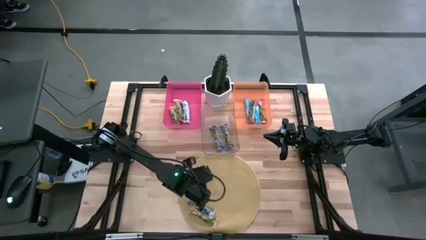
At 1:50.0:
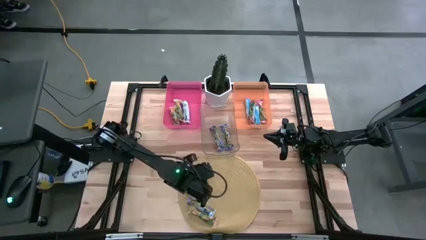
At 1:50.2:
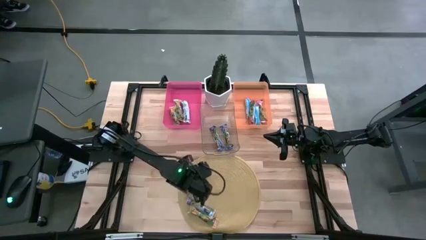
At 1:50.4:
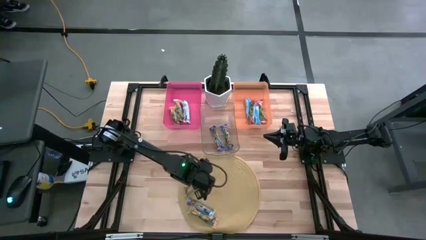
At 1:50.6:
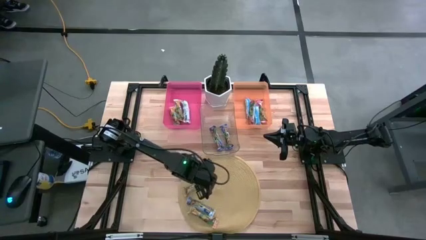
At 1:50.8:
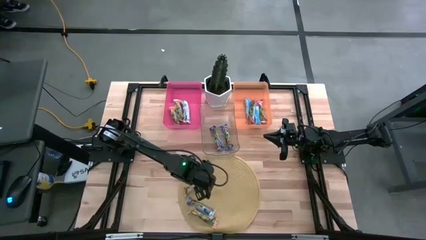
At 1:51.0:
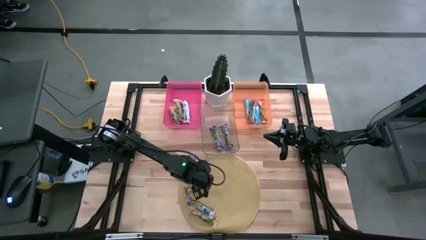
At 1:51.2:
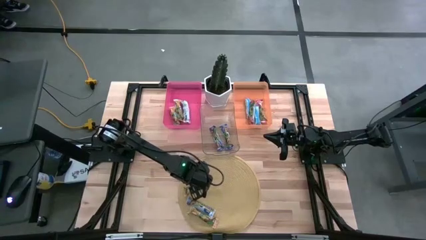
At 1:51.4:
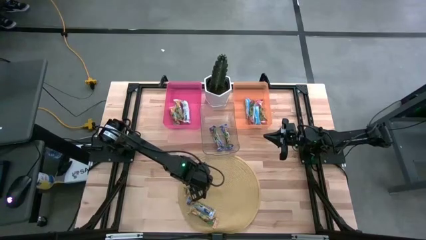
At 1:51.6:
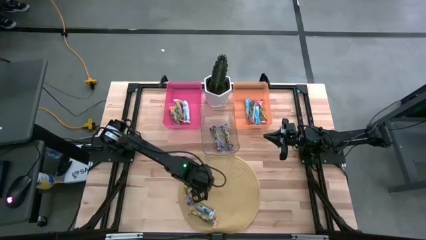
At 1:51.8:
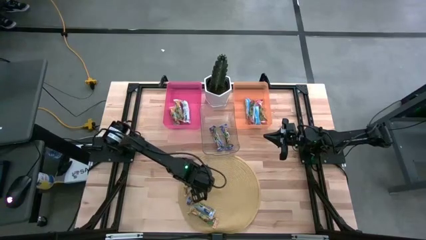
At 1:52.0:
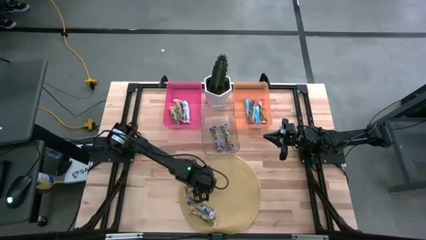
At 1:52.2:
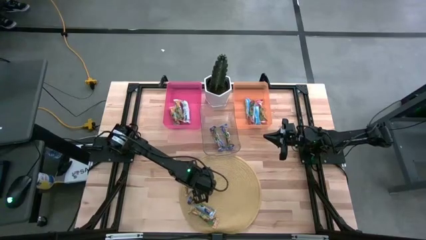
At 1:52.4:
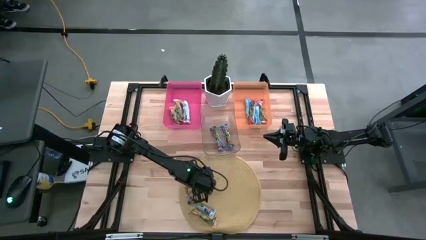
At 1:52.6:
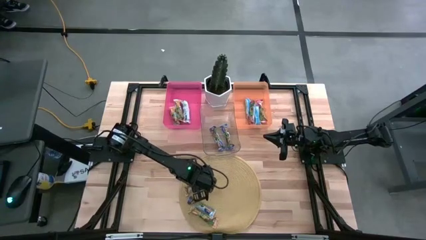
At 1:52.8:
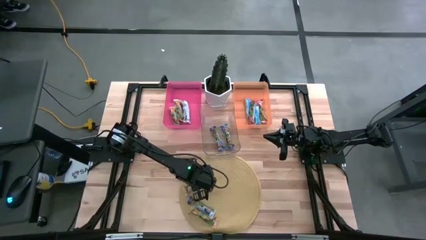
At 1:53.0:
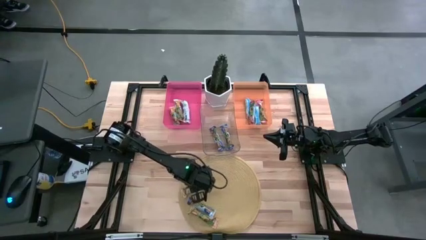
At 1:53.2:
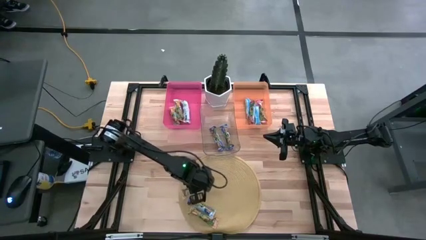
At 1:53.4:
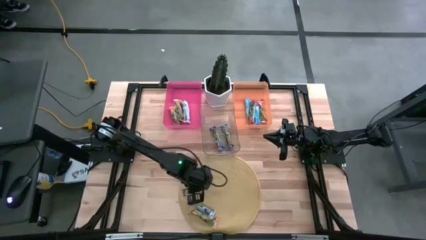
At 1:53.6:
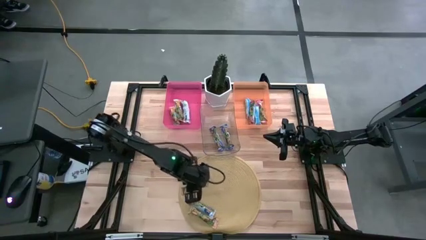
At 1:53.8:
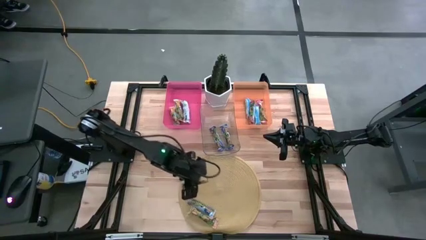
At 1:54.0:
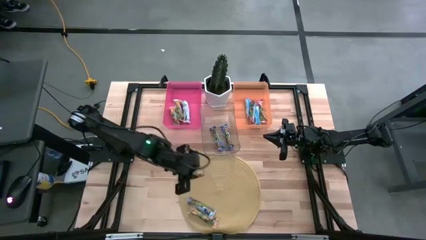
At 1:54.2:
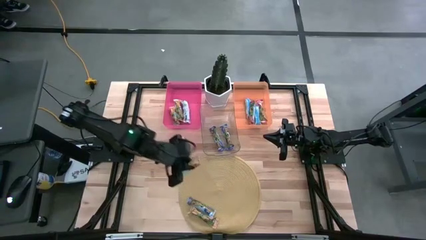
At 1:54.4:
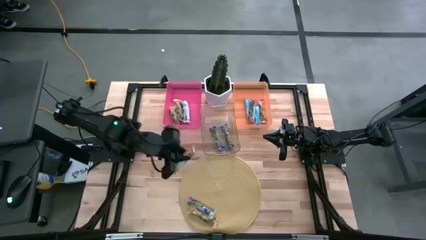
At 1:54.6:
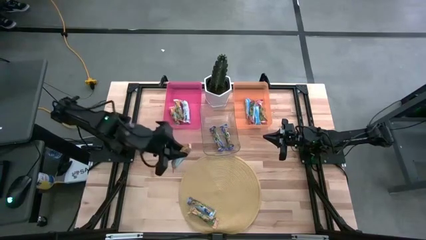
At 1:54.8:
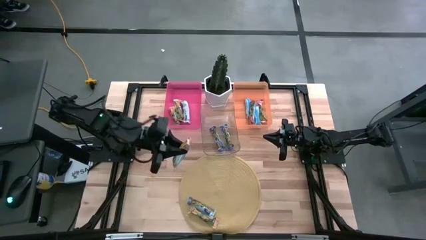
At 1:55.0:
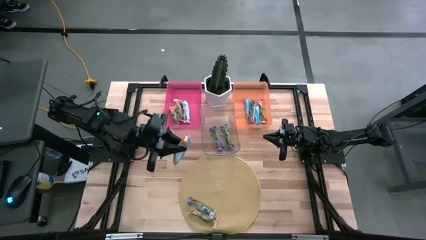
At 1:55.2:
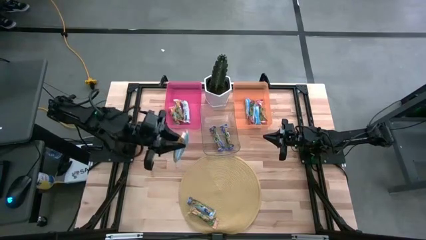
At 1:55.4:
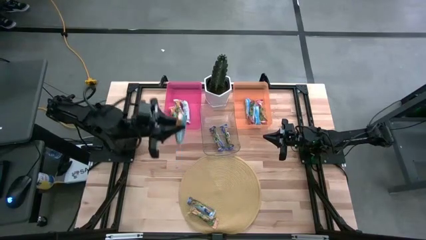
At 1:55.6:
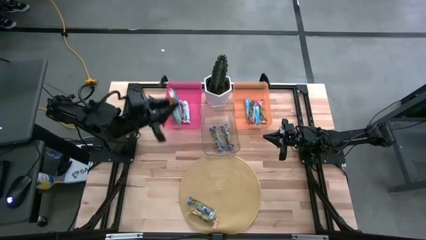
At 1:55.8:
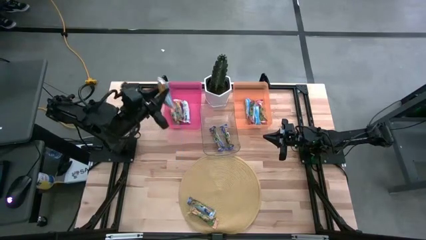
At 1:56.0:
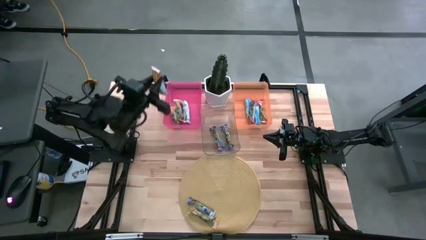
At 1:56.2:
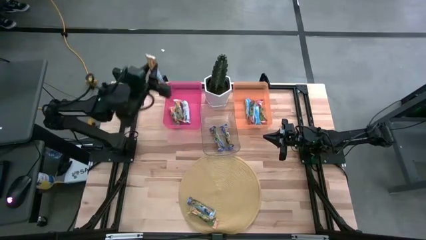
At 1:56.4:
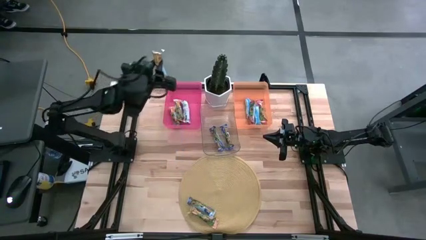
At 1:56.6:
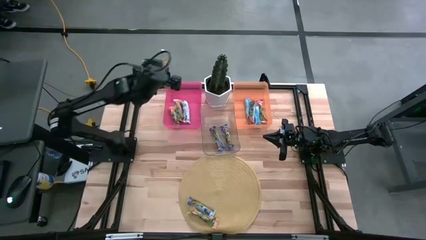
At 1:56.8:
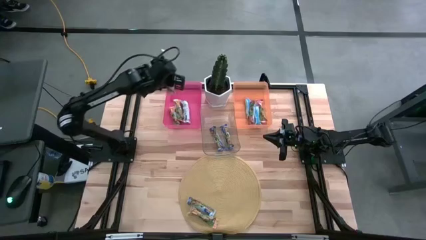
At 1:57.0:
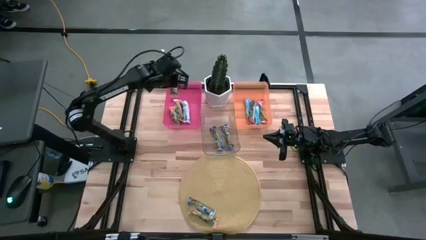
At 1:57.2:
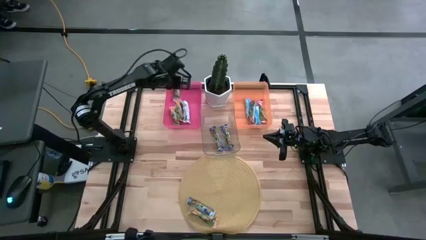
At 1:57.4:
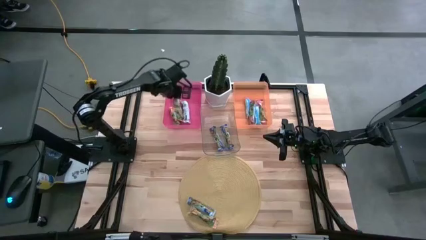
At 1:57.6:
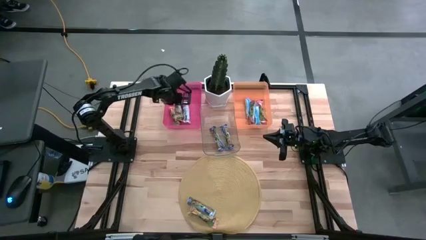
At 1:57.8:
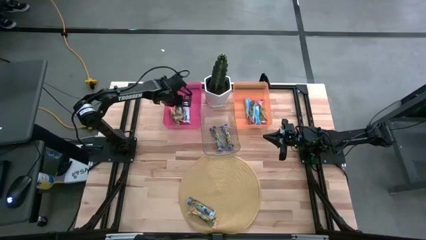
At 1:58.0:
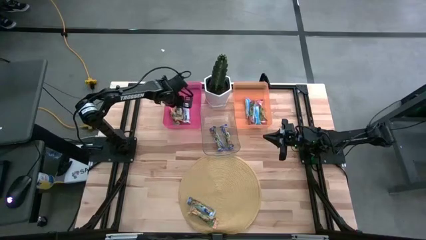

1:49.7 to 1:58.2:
Task: Pick and place Granola Bars by type
Put the yellow granola bar into the pink bin

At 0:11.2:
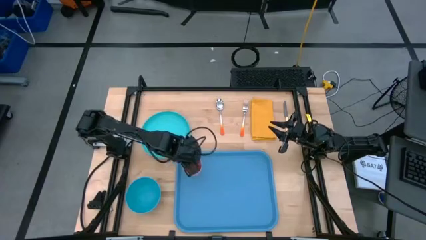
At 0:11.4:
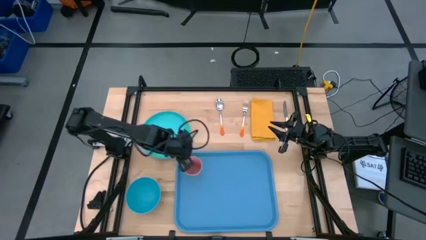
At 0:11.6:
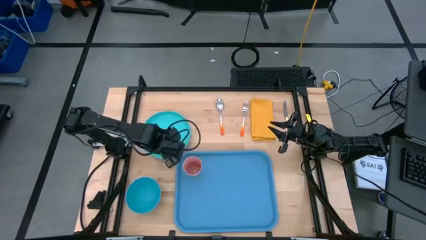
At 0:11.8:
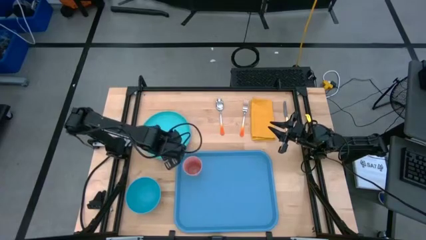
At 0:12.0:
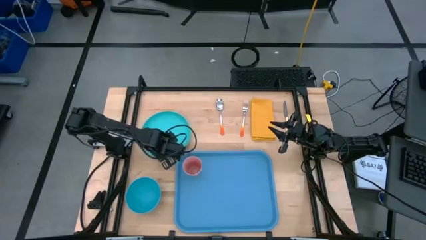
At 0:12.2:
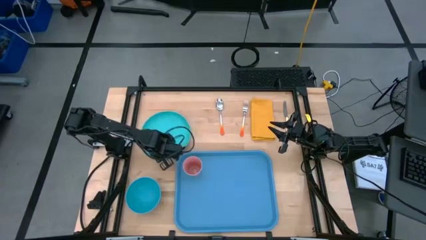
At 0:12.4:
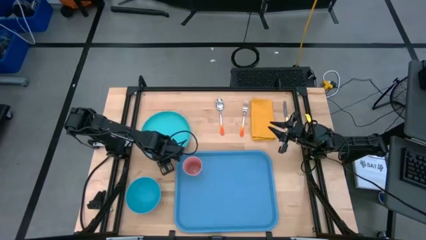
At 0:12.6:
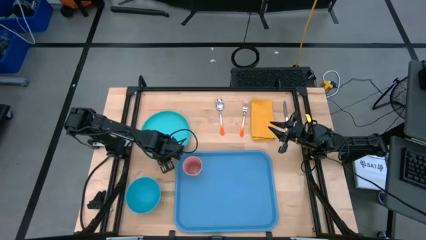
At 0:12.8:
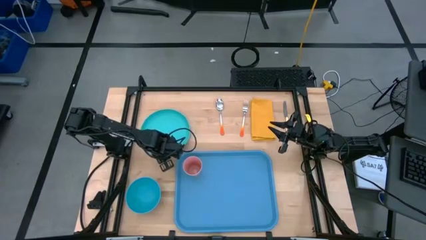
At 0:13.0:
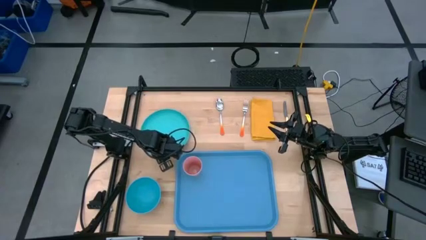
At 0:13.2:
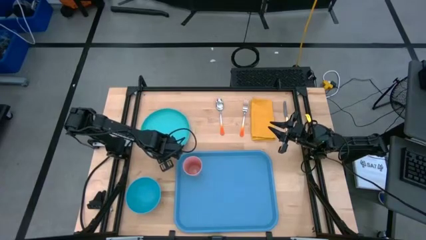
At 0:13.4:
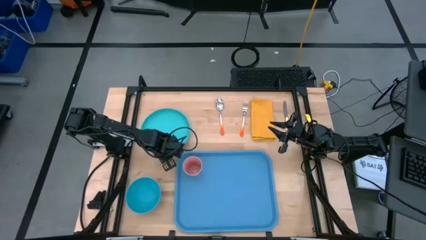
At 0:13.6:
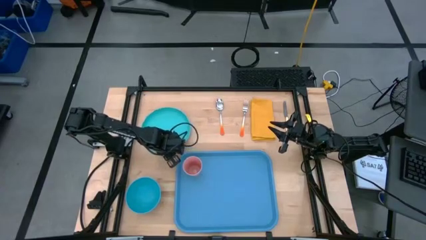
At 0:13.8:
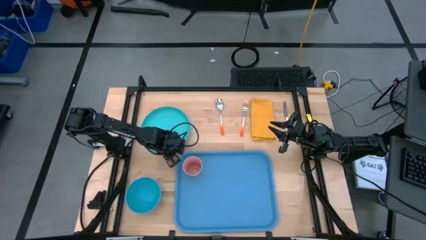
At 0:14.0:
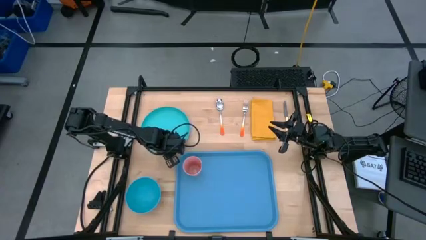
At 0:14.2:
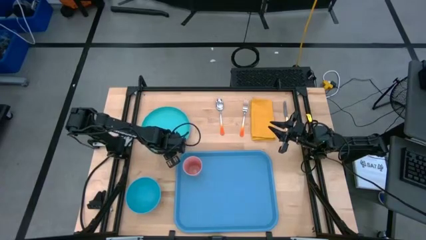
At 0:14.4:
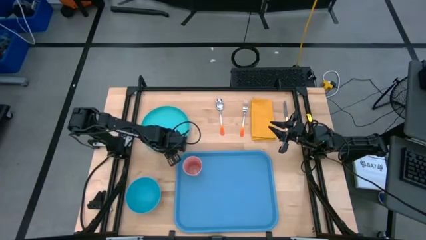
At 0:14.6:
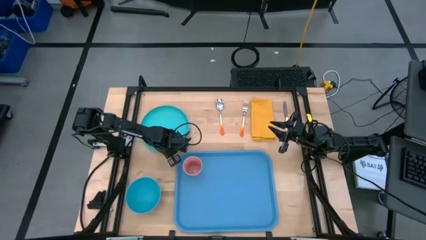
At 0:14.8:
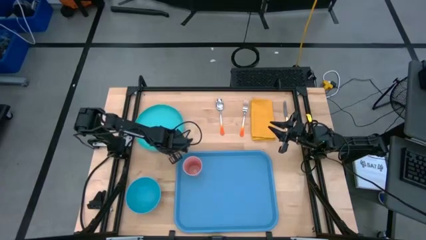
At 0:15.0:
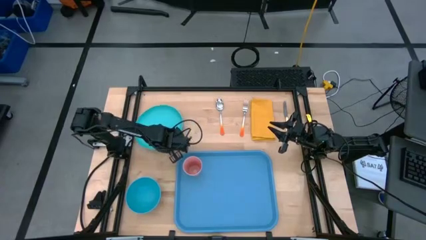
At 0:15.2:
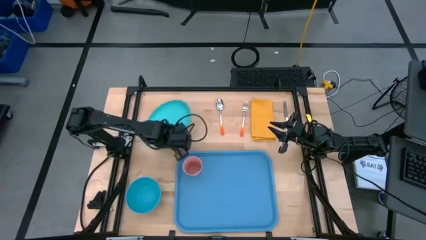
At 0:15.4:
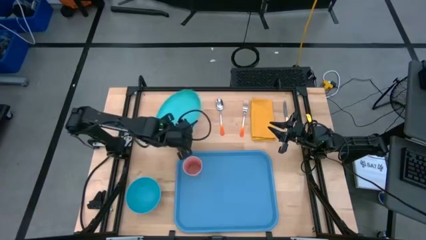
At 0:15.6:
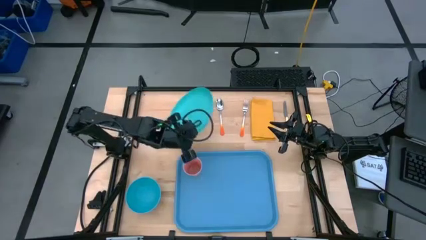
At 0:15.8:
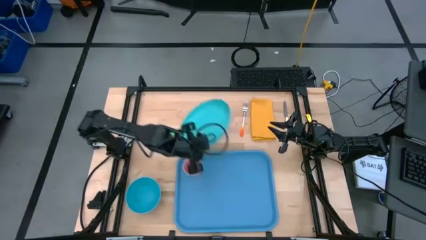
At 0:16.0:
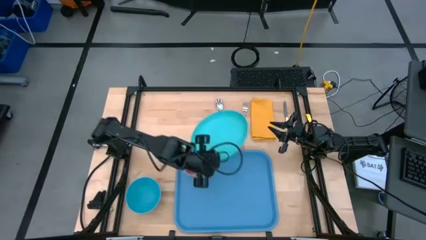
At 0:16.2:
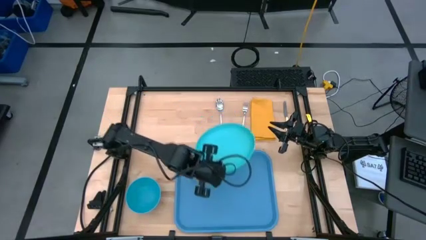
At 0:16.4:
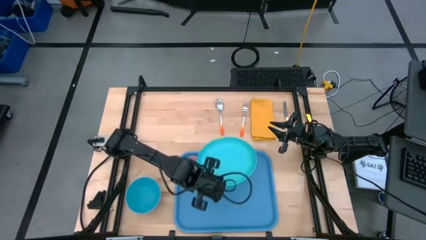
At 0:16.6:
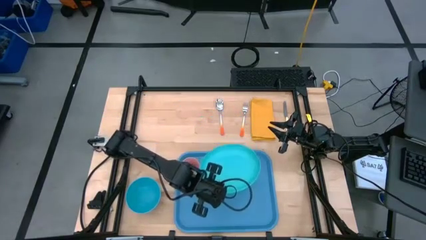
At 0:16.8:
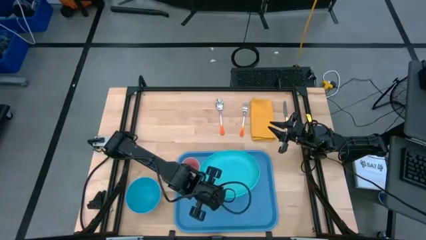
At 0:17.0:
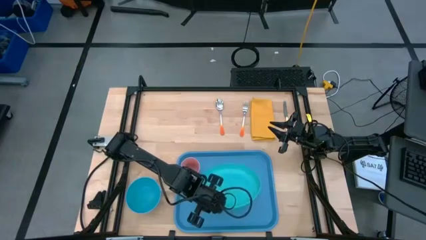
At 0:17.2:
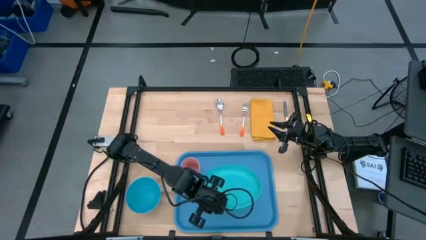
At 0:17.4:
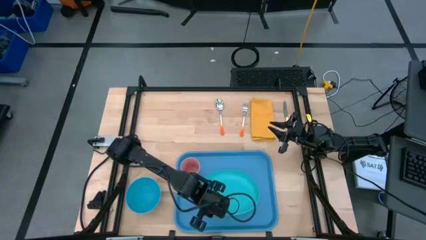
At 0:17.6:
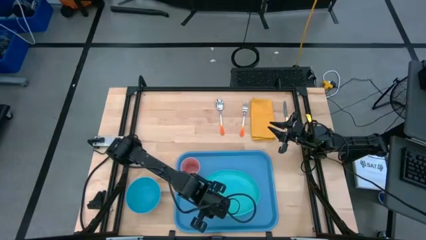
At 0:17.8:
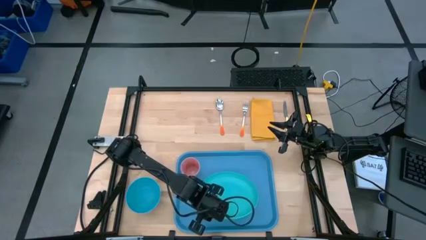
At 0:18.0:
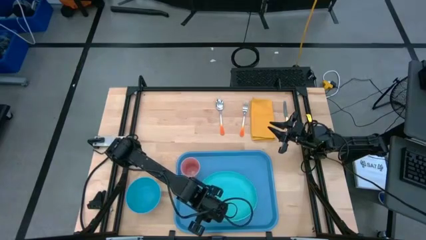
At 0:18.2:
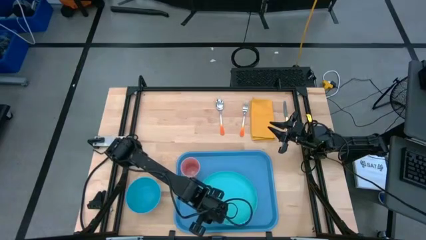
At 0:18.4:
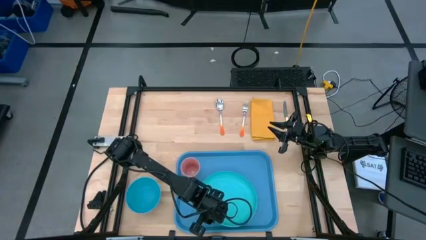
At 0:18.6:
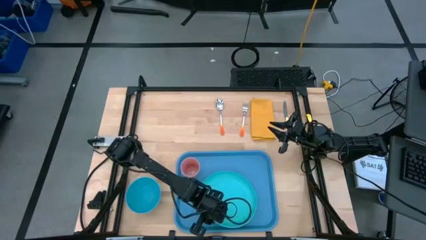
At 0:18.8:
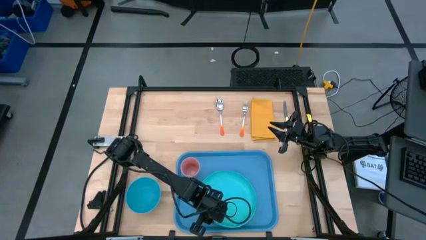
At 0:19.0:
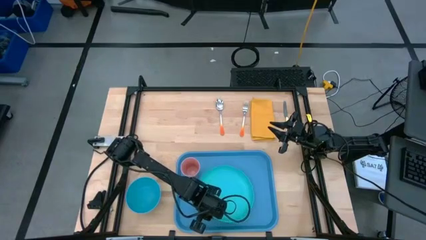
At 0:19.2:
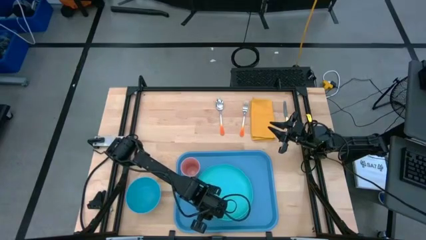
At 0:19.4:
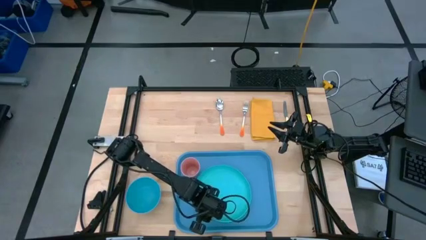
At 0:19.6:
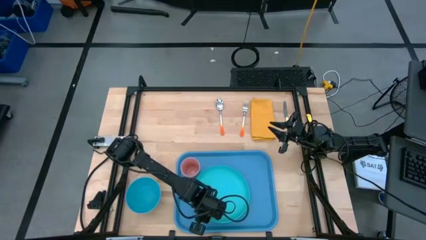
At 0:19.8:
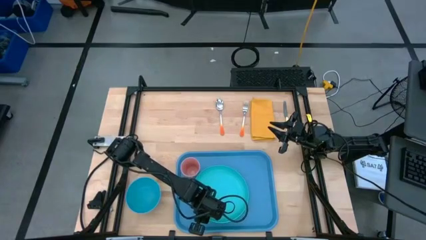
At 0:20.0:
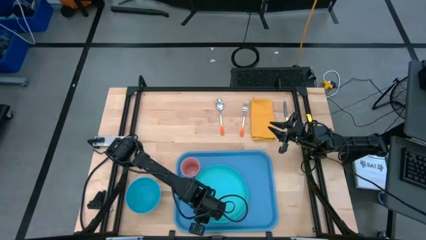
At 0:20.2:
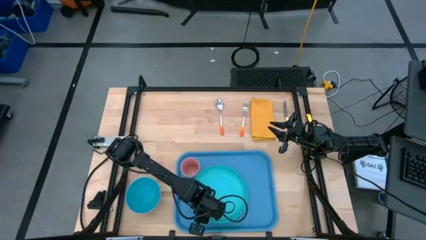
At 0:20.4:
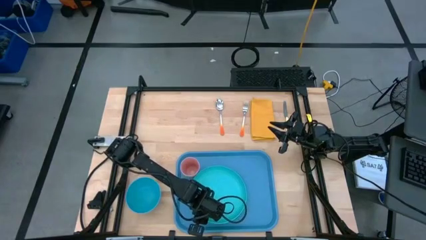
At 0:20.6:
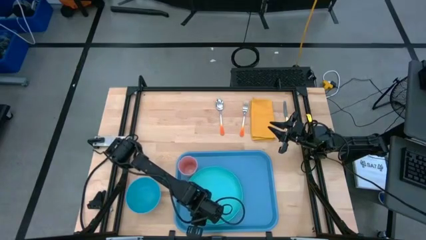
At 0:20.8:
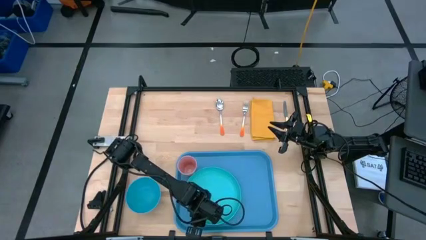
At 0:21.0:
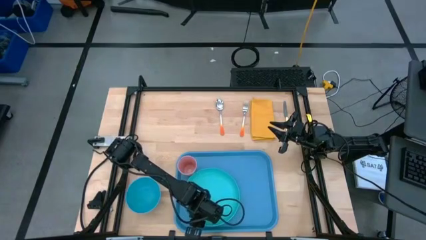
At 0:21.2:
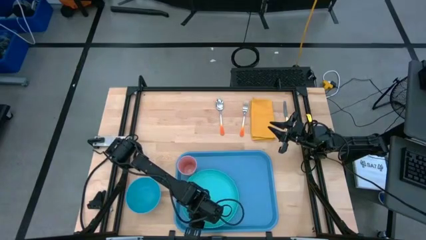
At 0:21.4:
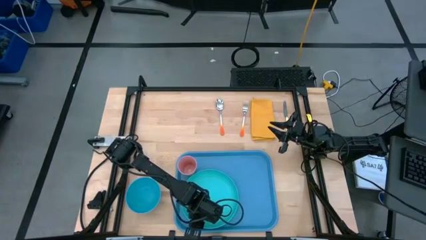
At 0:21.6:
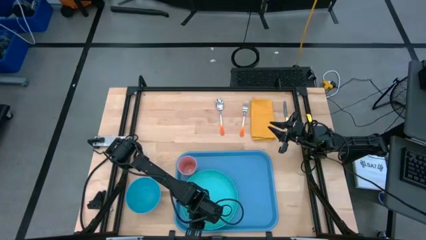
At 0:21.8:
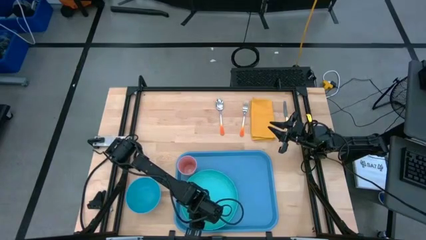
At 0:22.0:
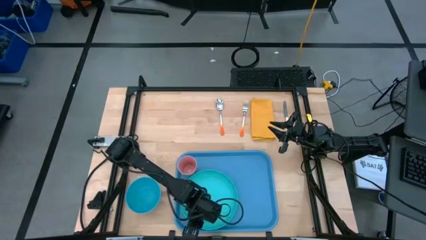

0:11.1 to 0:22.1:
Task: Set up tray
Put the light blue plate on the blue serving tray
